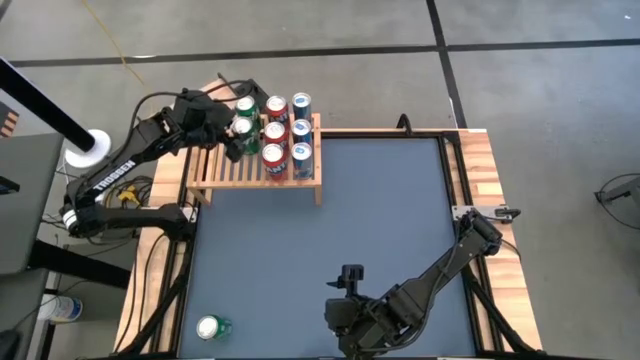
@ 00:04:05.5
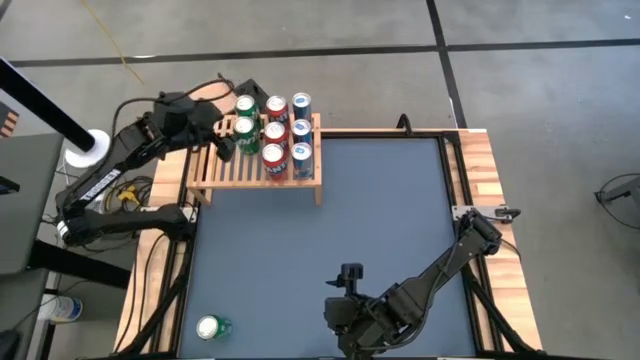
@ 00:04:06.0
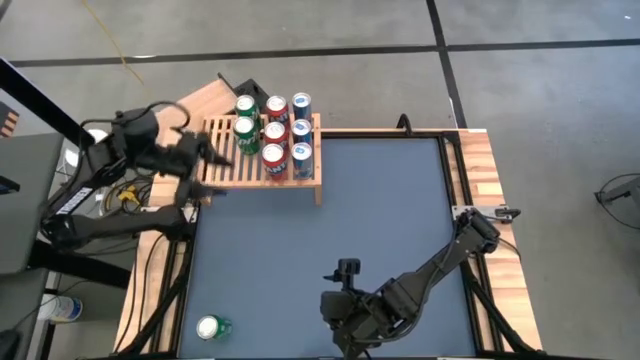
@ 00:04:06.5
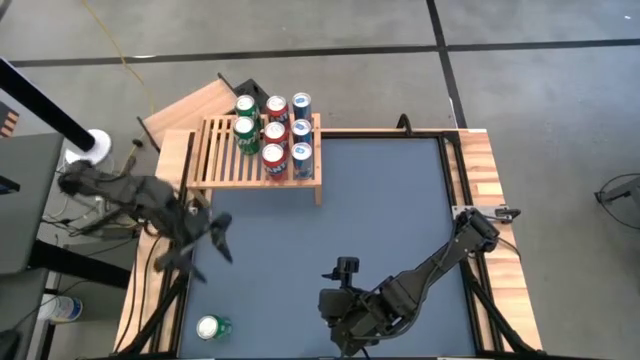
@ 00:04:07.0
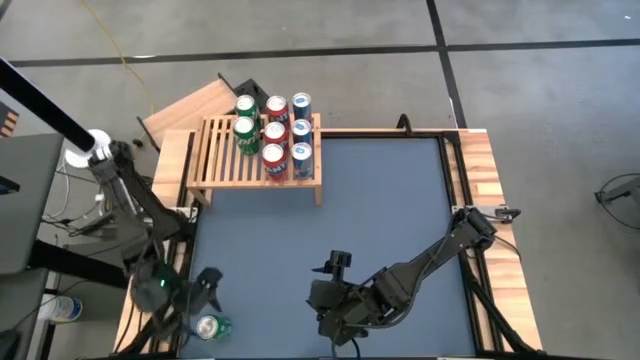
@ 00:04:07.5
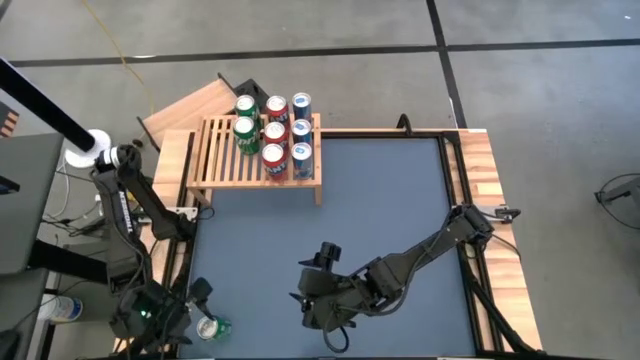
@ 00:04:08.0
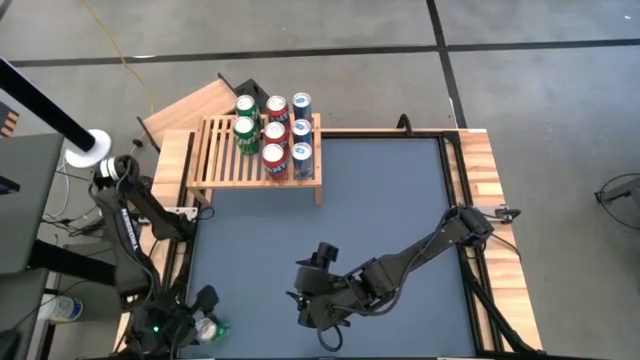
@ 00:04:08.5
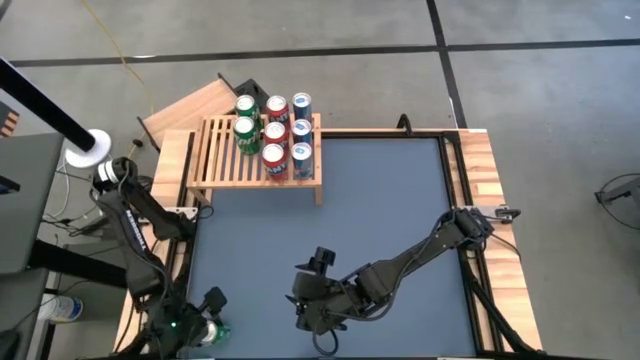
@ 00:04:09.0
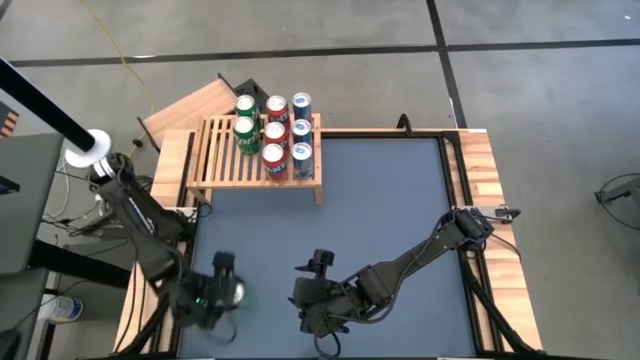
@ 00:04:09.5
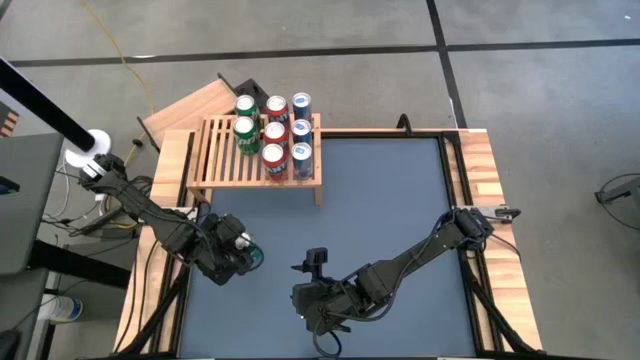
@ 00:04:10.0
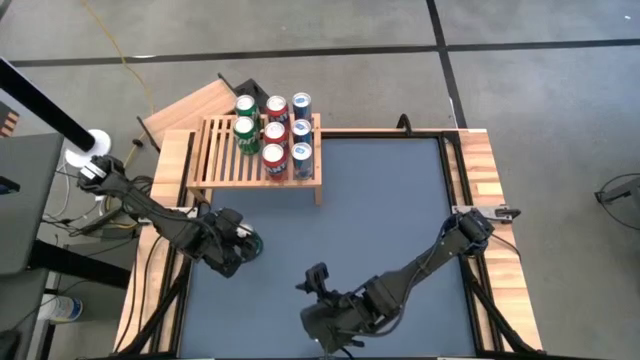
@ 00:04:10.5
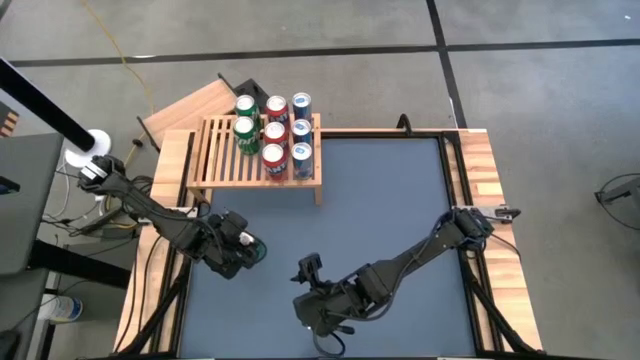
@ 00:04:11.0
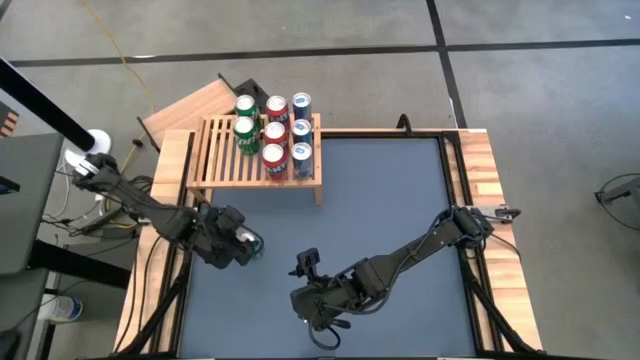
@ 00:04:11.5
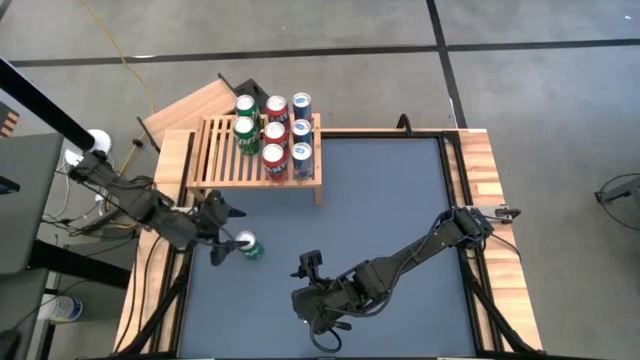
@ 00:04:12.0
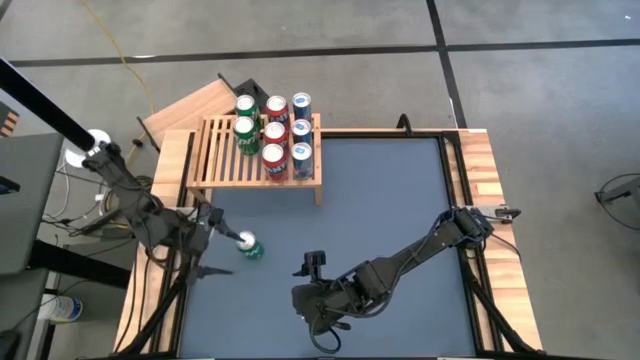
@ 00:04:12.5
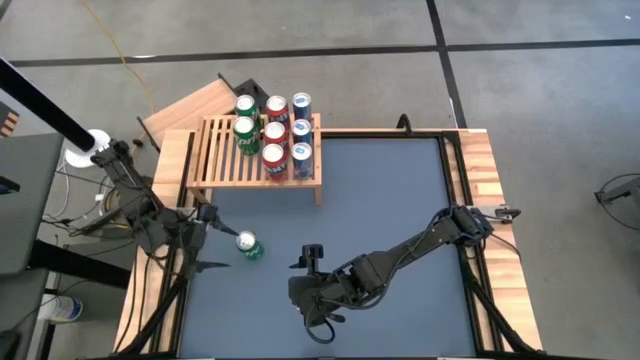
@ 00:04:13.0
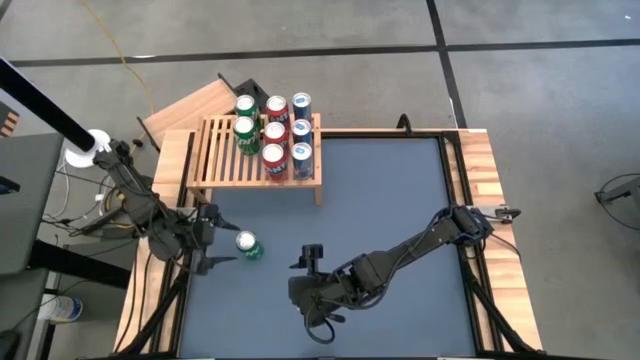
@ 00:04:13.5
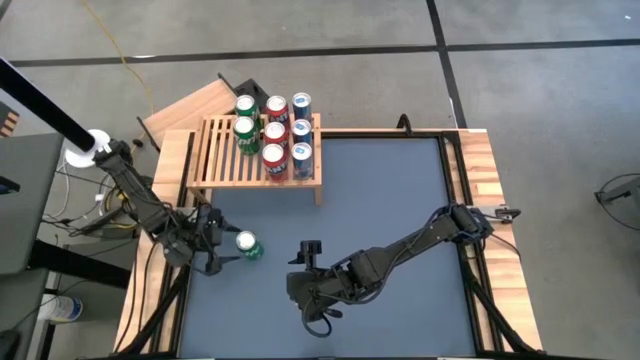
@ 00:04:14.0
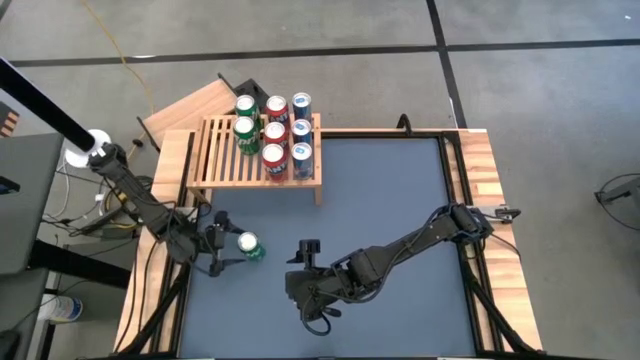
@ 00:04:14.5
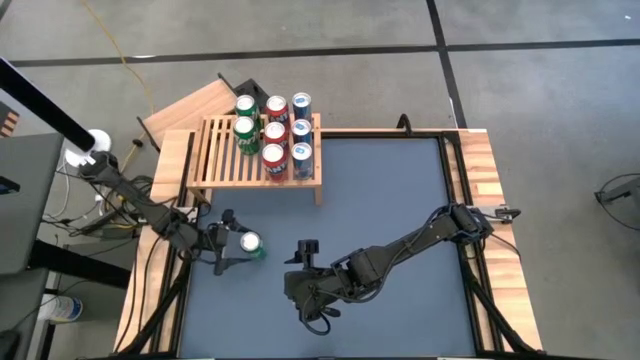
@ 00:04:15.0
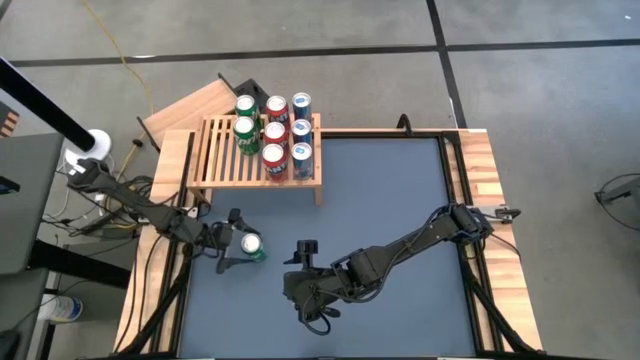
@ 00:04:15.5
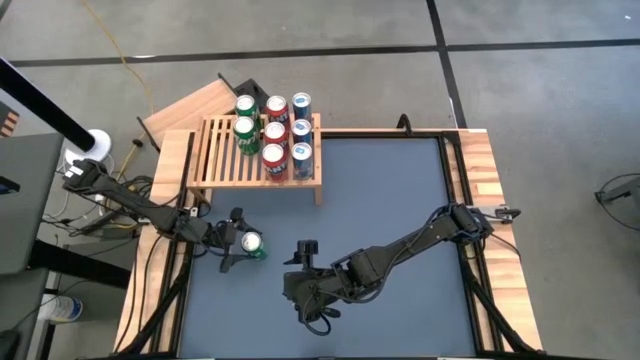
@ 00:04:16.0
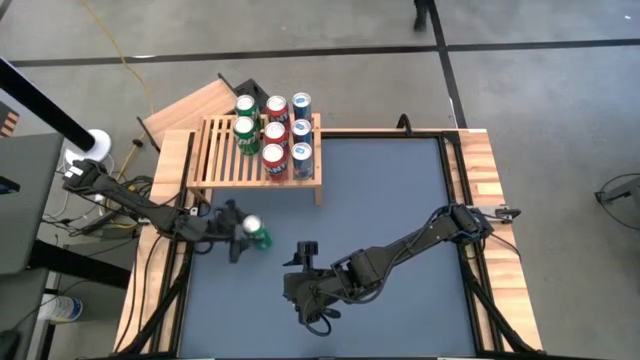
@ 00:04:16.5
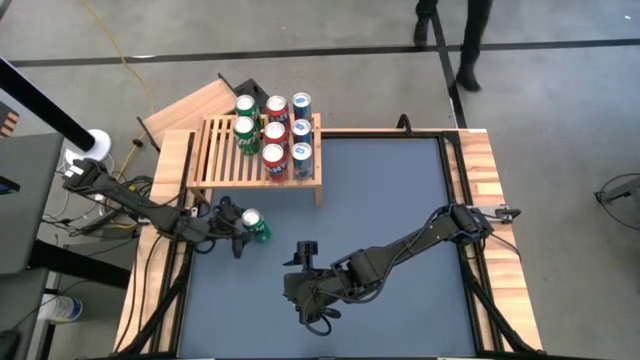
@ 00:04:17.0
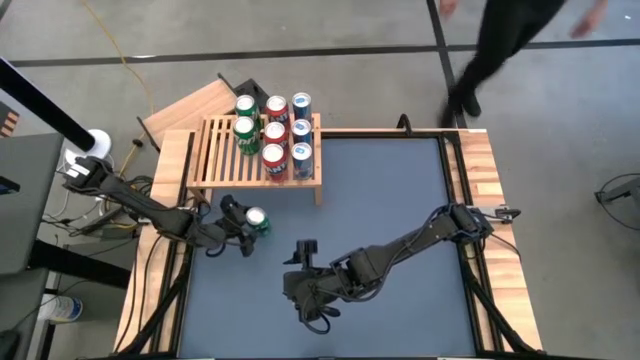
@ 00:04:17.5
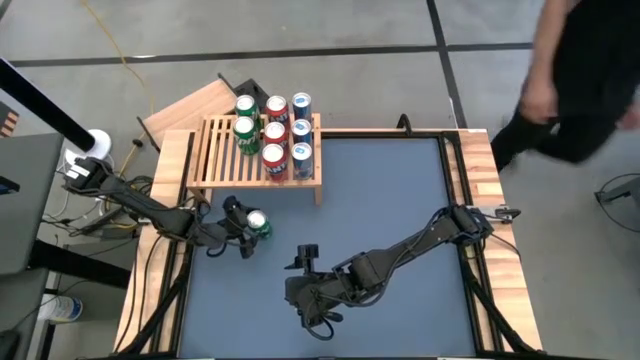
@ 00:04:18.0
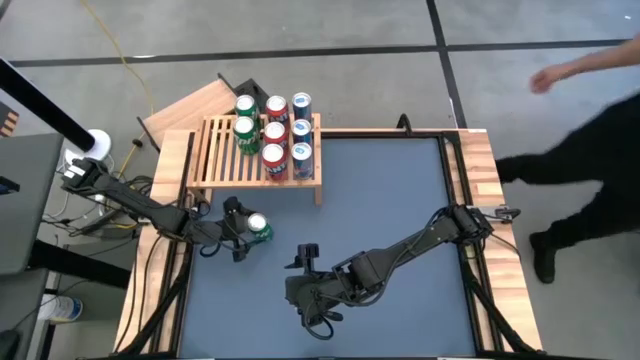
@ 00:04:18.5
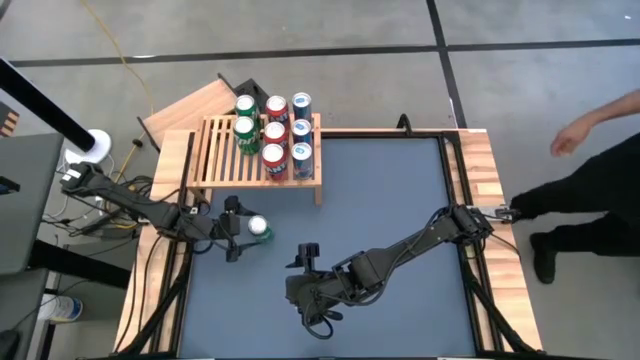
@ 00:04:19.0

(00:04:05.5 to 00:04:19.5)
Task: Place canned beverage on shelf
Put the green soda can on the shelf aligned with the other green soda cans
